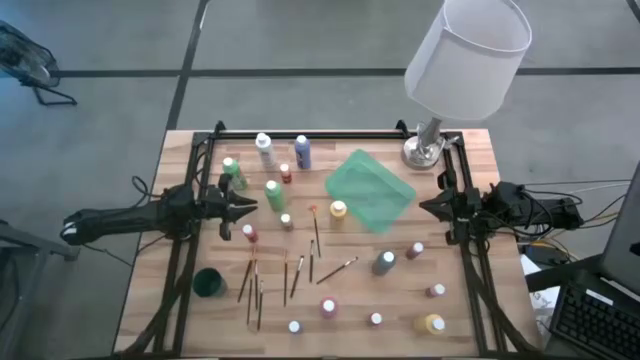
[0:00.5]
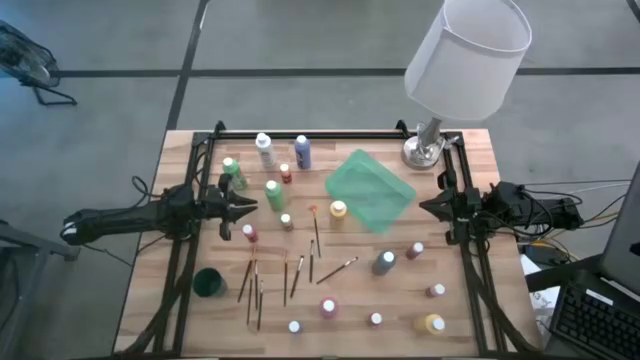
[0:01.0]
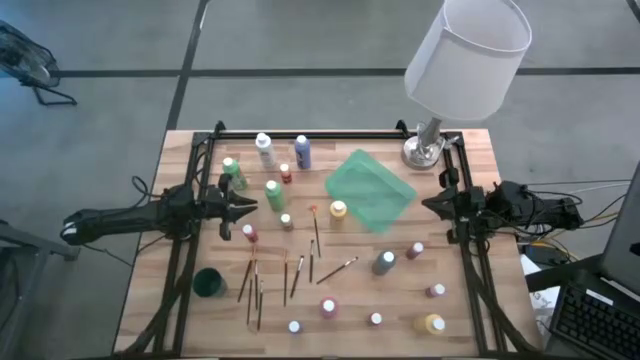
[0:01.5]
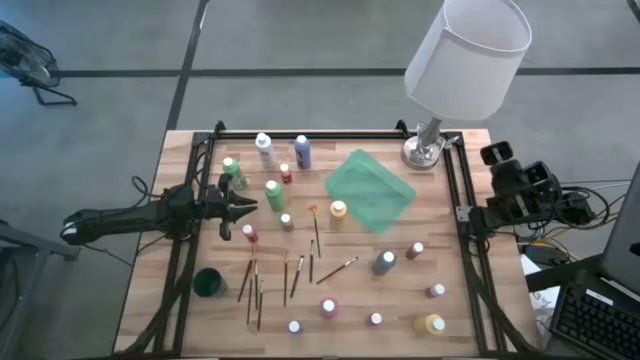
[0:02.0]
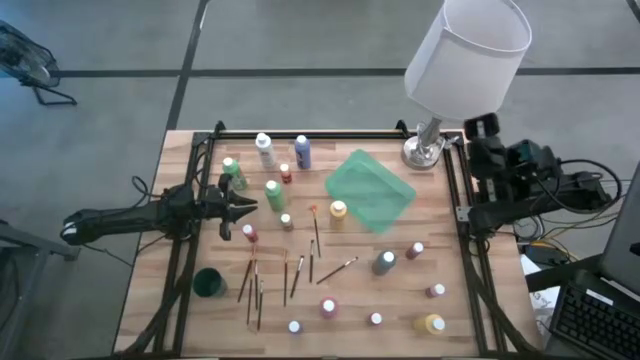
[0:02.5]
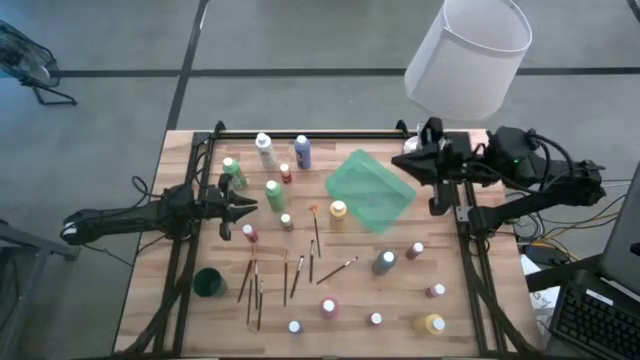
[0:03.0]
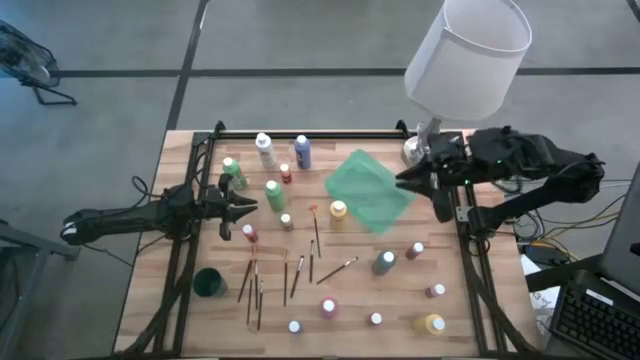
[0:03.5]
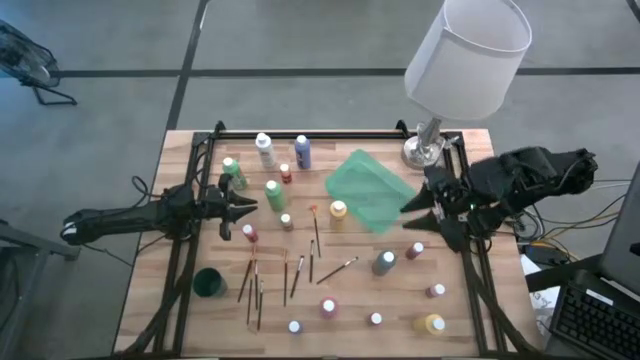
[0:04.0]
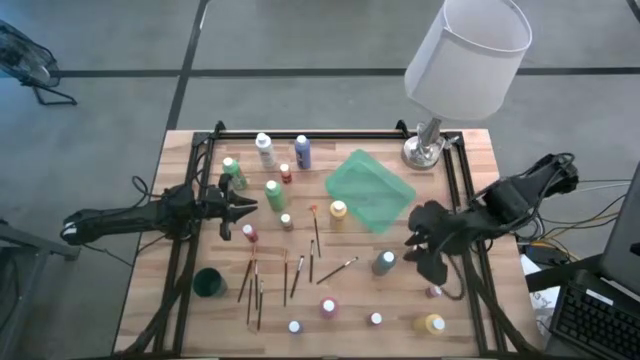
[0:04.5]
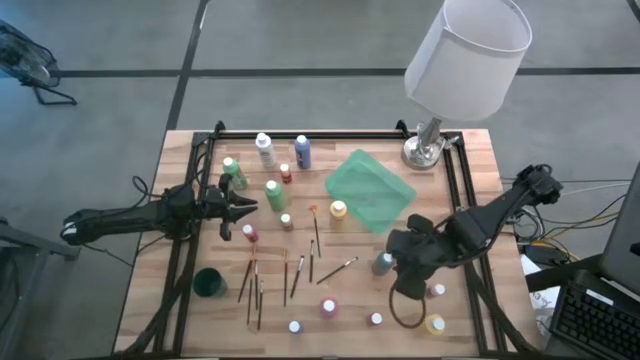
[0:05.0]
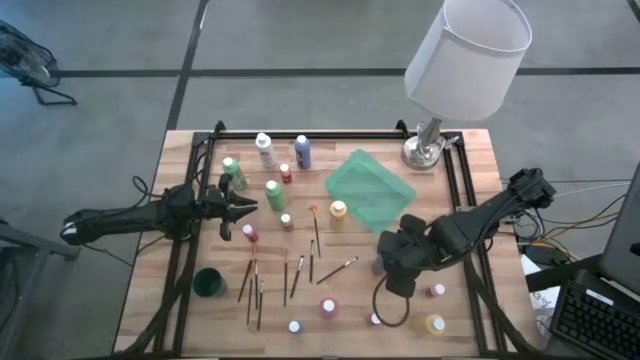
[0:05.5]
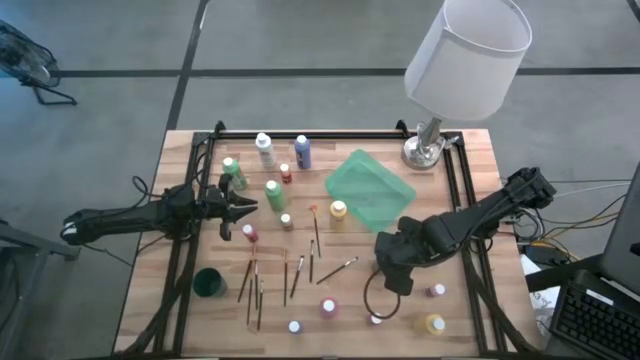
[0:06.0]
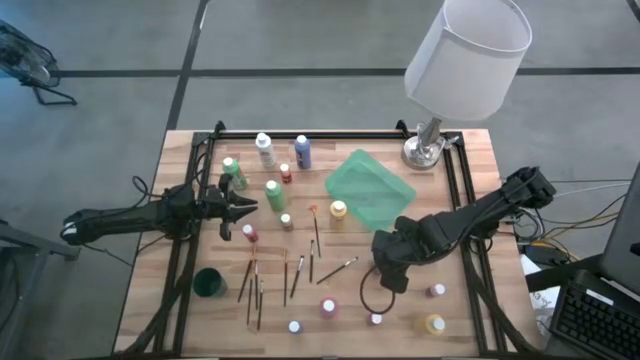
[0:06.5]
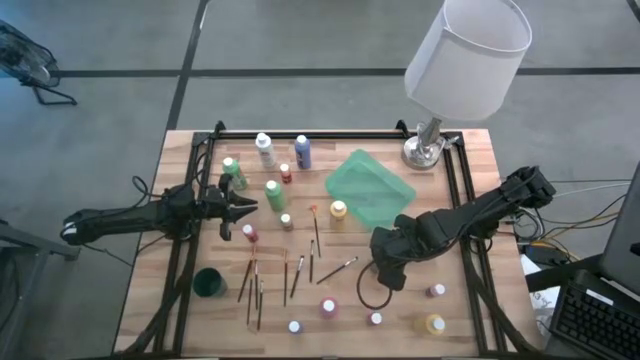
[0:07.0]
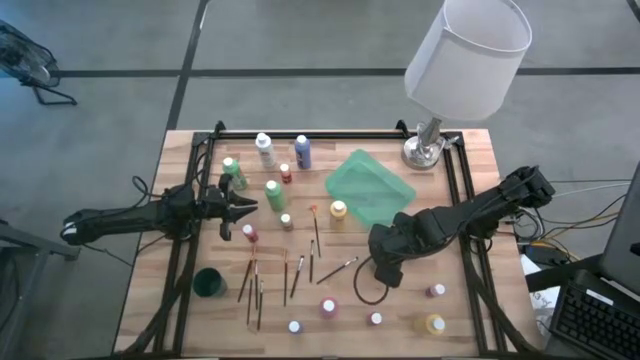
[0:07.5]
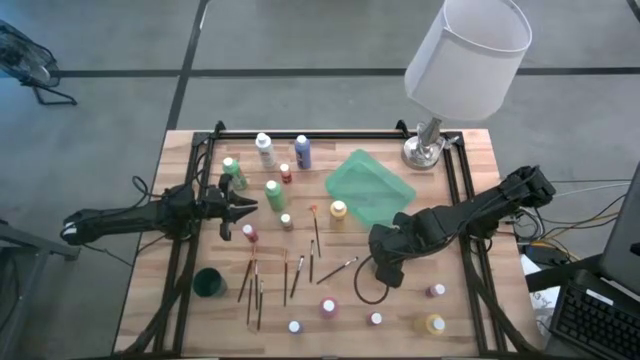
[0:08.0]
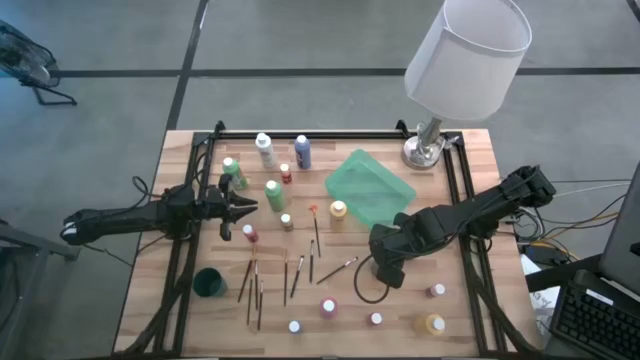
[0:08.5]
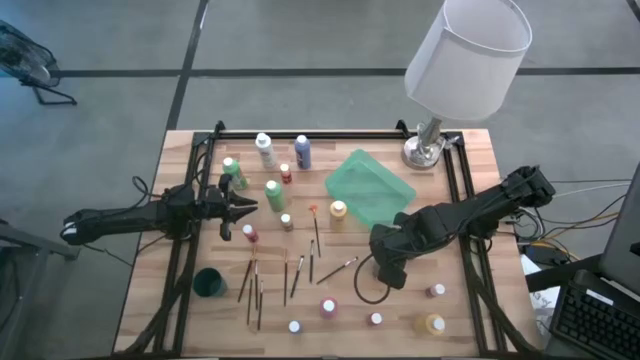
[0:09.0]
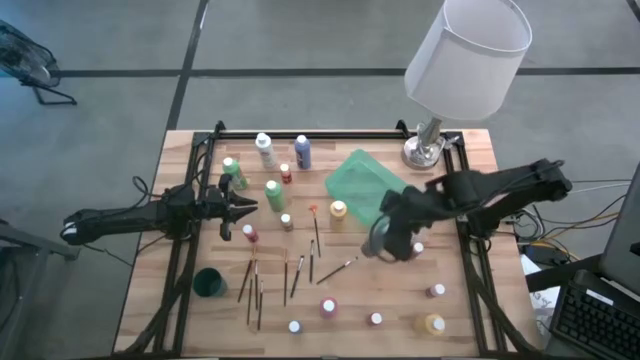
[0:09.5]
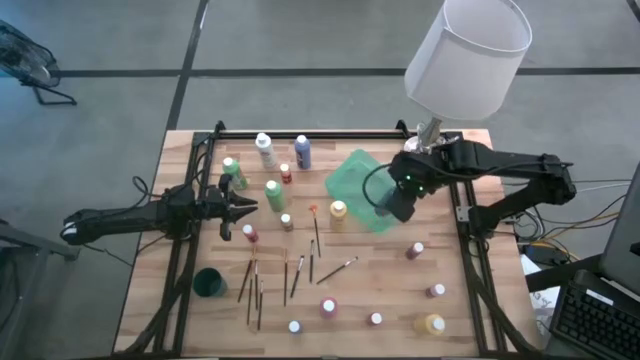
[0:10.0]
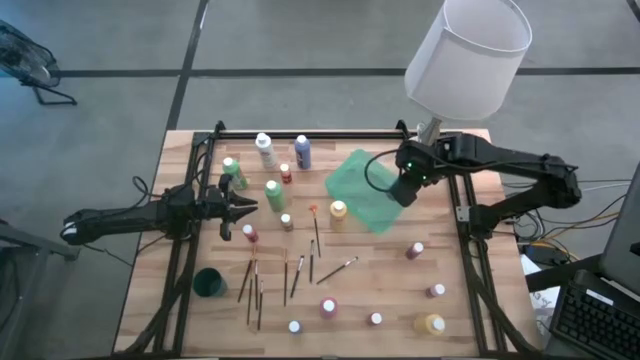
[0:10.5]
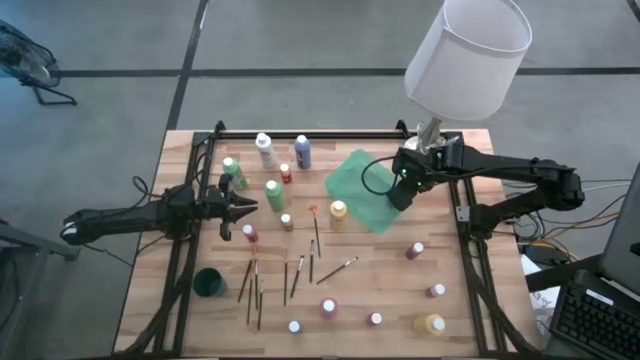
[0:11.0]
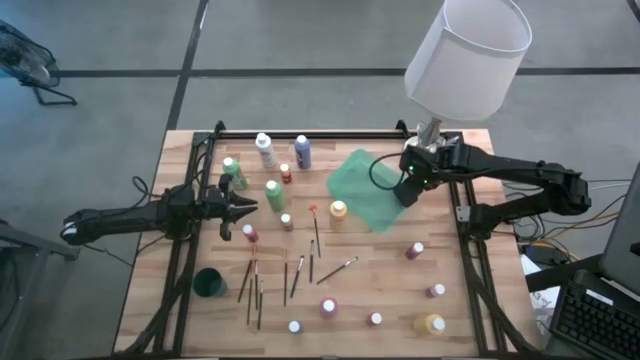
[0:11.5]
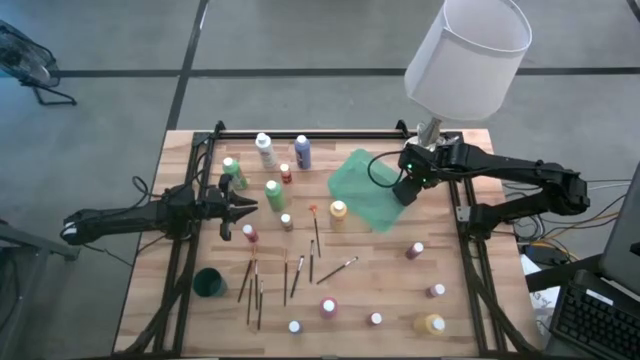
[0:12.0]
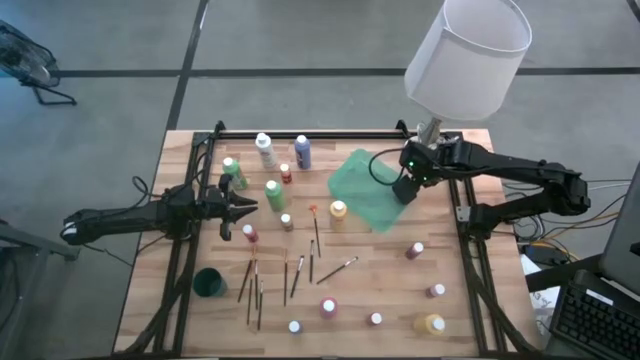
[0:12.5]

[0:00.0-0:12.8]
Task: Pick & Place Paint Supplies
Put the big blue paint bottle into the green bin
